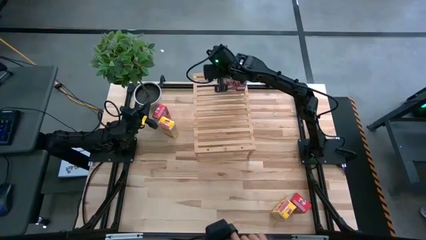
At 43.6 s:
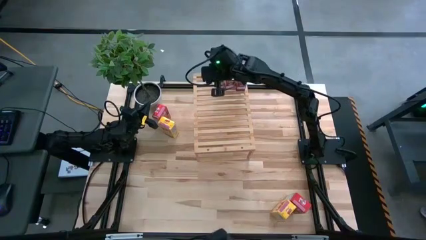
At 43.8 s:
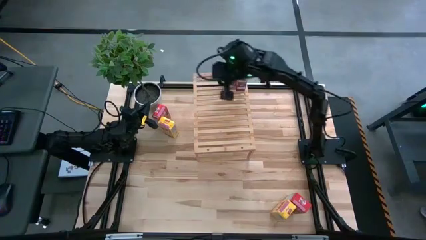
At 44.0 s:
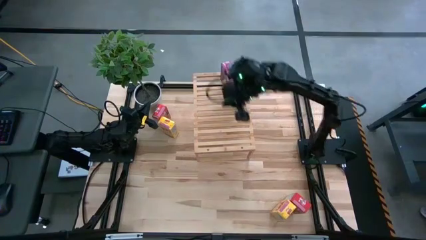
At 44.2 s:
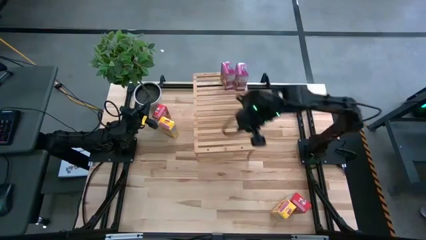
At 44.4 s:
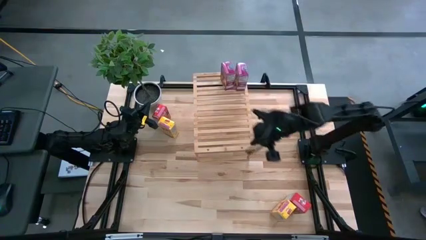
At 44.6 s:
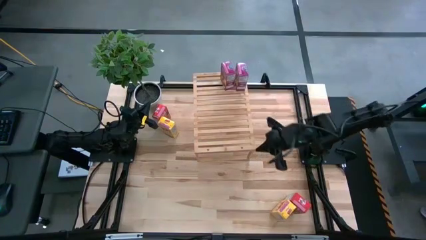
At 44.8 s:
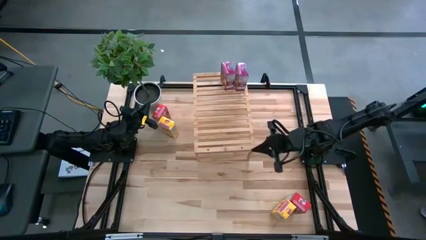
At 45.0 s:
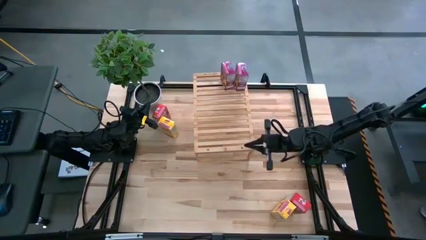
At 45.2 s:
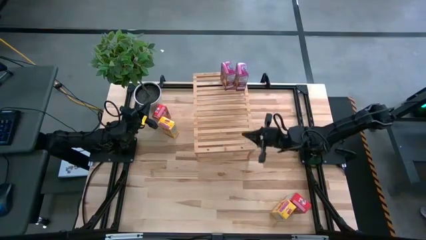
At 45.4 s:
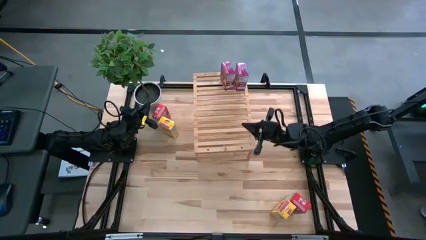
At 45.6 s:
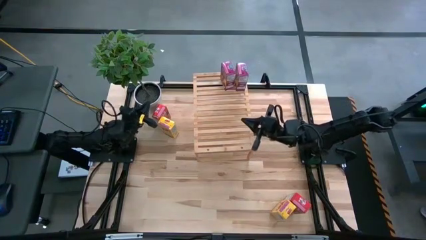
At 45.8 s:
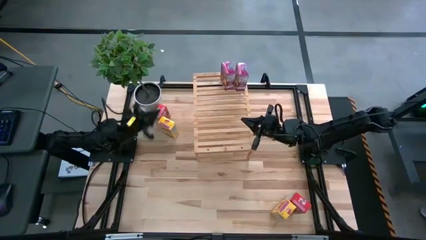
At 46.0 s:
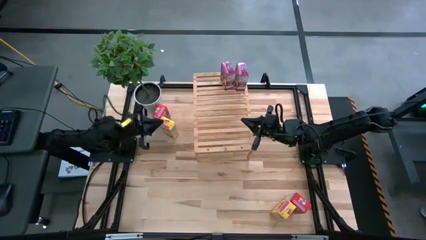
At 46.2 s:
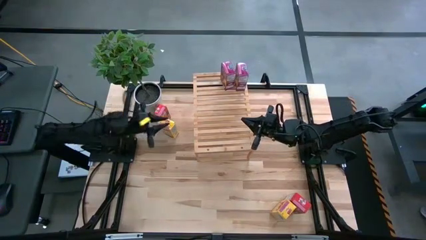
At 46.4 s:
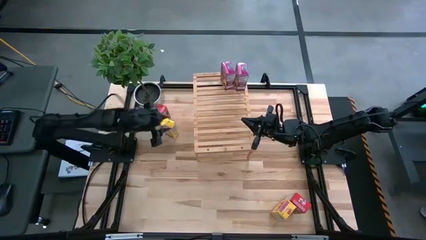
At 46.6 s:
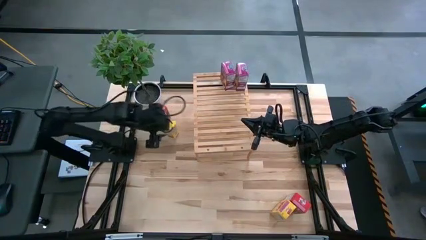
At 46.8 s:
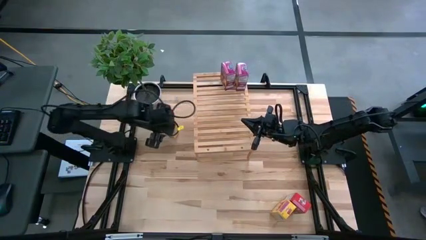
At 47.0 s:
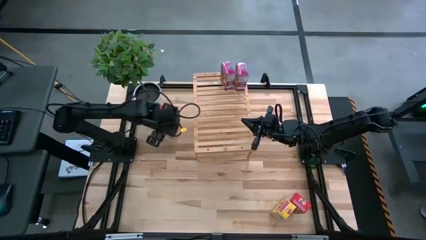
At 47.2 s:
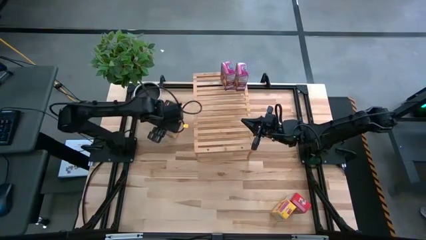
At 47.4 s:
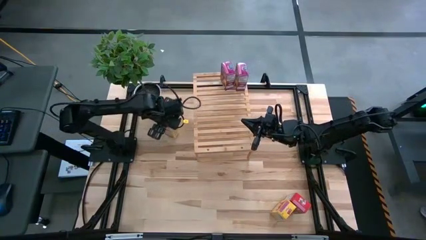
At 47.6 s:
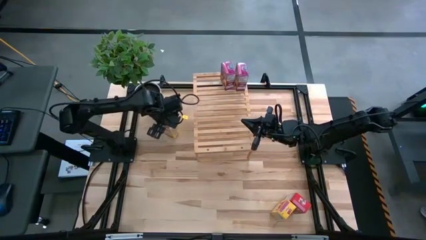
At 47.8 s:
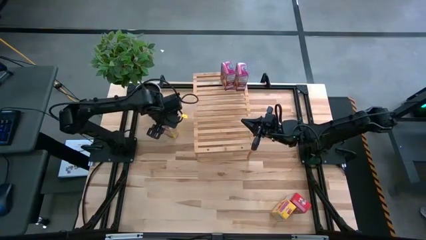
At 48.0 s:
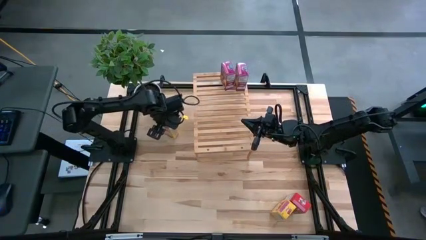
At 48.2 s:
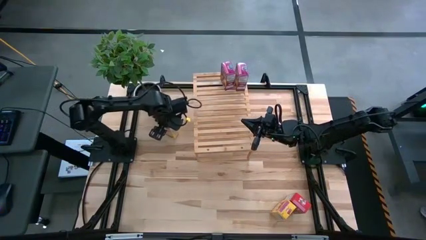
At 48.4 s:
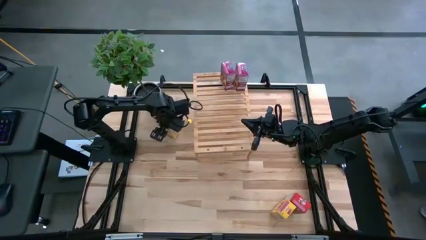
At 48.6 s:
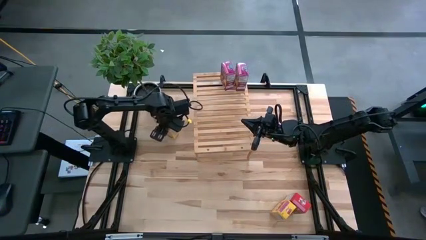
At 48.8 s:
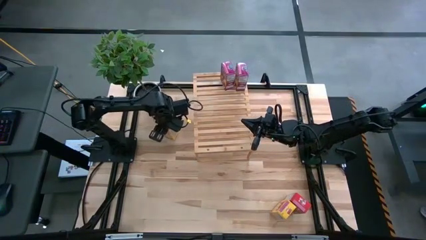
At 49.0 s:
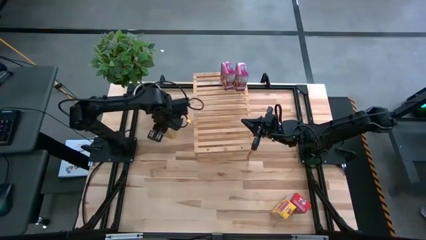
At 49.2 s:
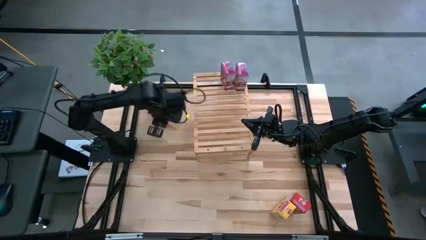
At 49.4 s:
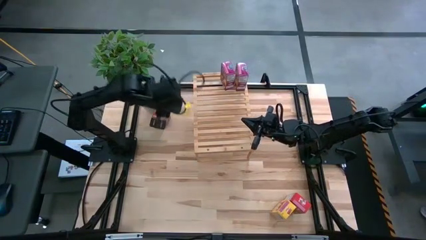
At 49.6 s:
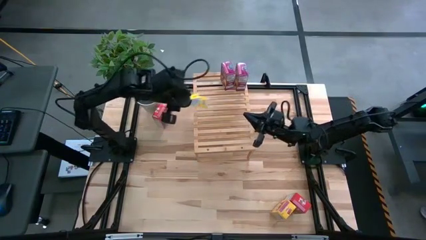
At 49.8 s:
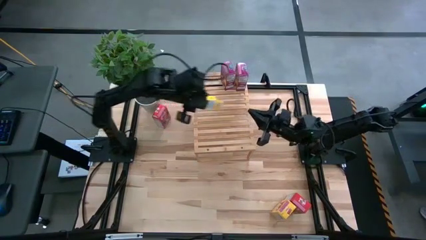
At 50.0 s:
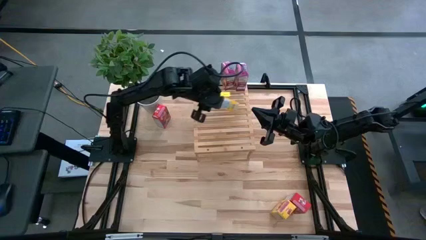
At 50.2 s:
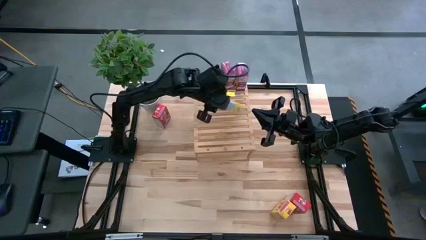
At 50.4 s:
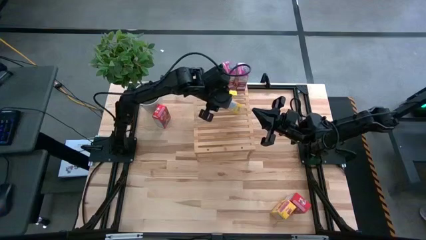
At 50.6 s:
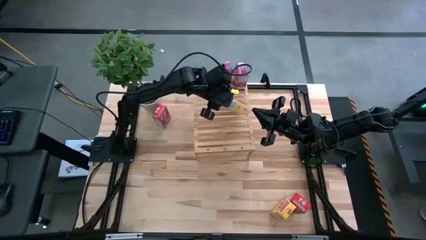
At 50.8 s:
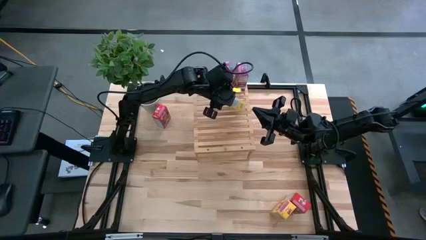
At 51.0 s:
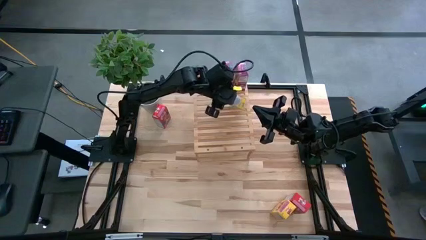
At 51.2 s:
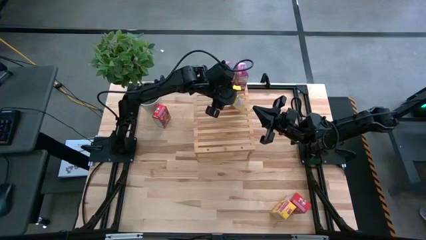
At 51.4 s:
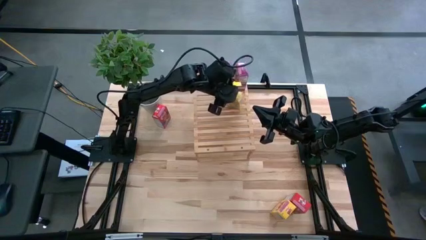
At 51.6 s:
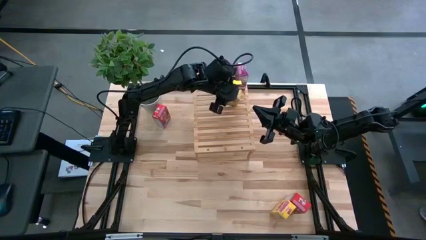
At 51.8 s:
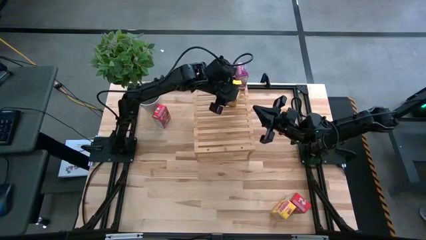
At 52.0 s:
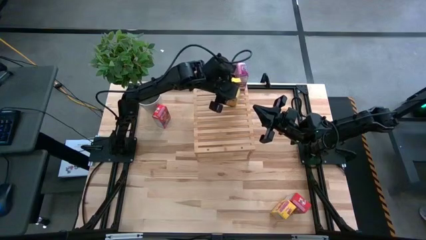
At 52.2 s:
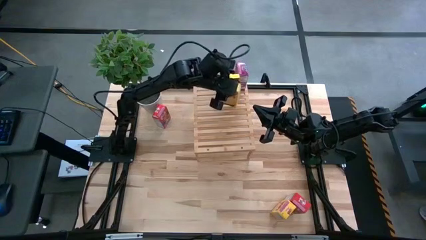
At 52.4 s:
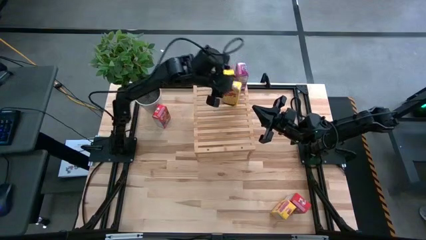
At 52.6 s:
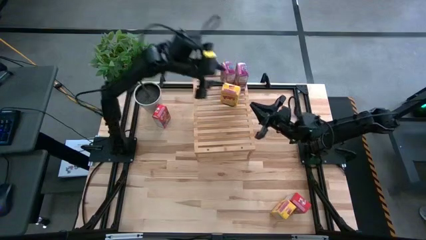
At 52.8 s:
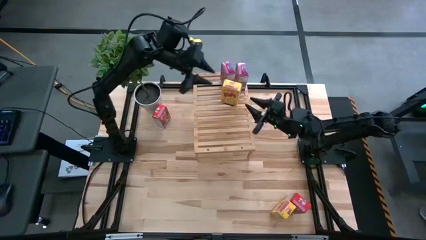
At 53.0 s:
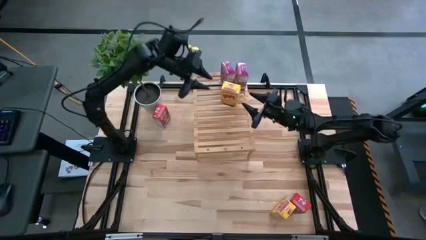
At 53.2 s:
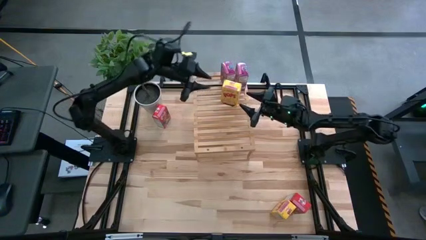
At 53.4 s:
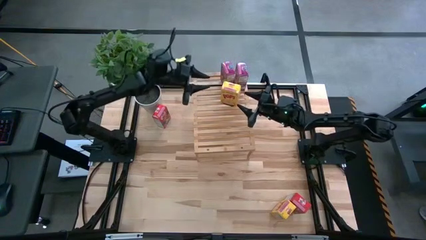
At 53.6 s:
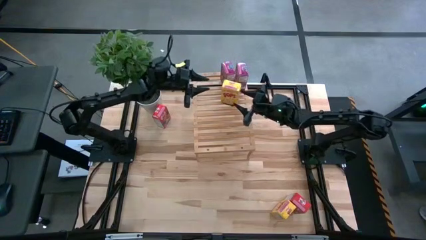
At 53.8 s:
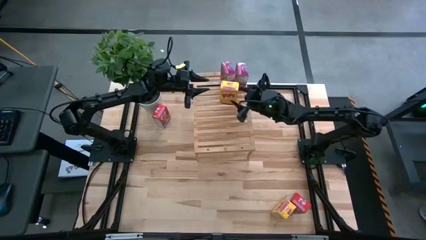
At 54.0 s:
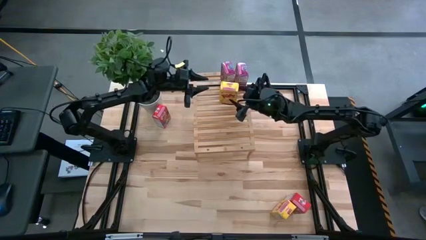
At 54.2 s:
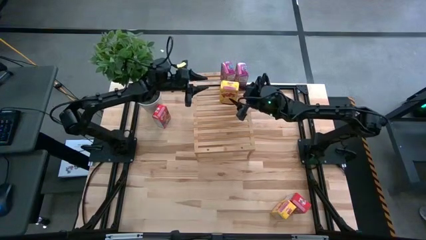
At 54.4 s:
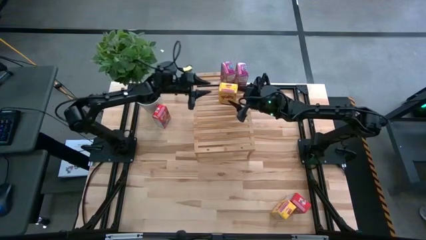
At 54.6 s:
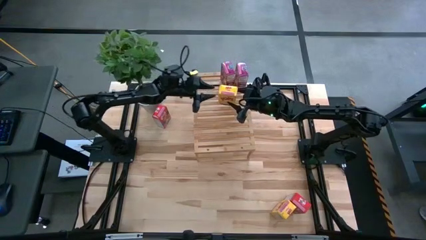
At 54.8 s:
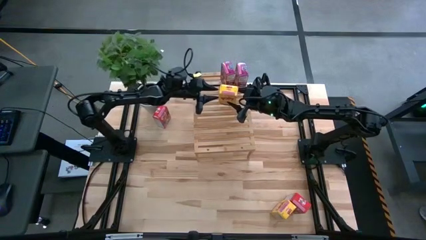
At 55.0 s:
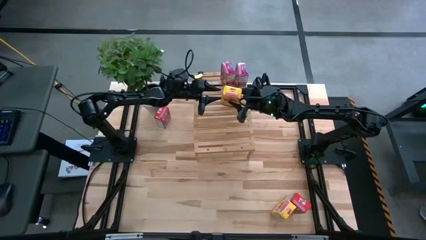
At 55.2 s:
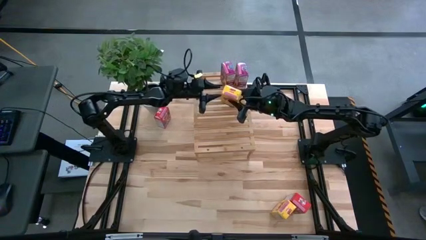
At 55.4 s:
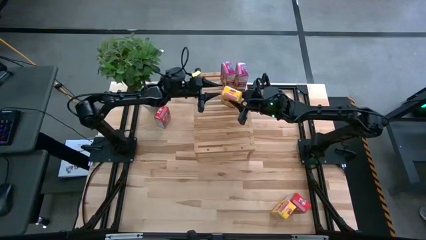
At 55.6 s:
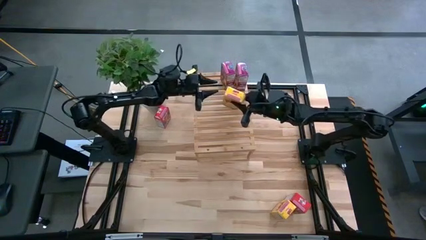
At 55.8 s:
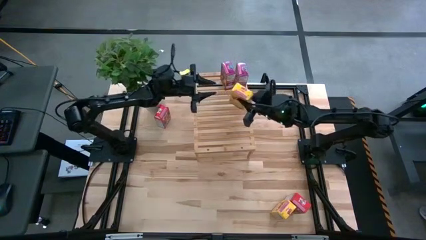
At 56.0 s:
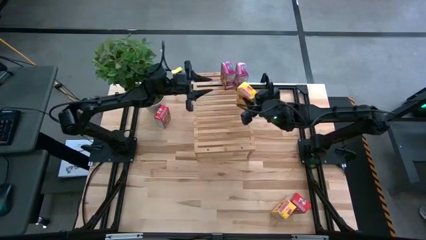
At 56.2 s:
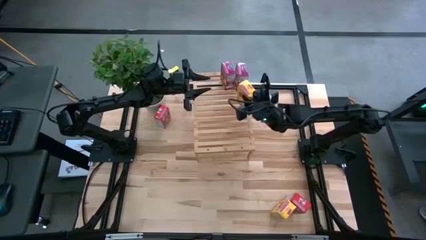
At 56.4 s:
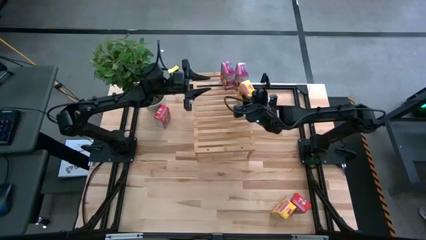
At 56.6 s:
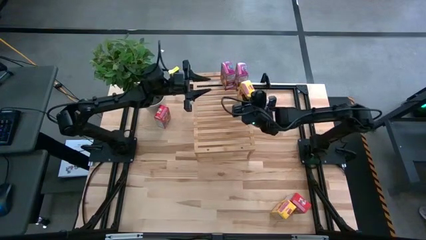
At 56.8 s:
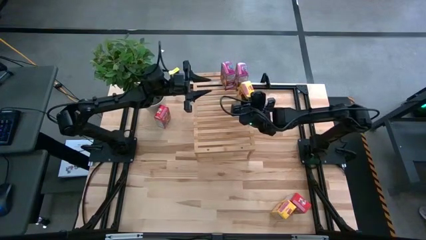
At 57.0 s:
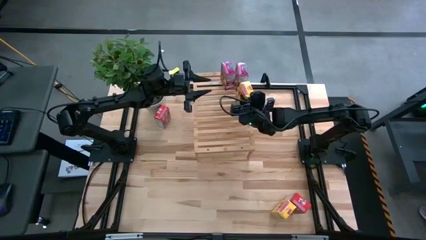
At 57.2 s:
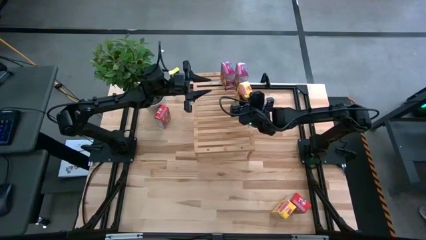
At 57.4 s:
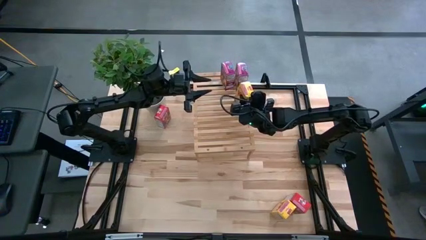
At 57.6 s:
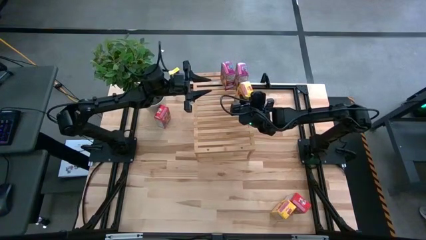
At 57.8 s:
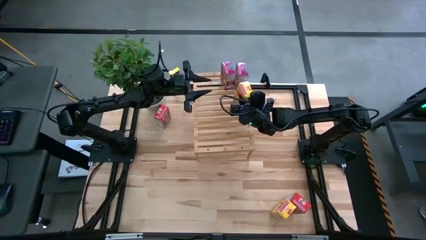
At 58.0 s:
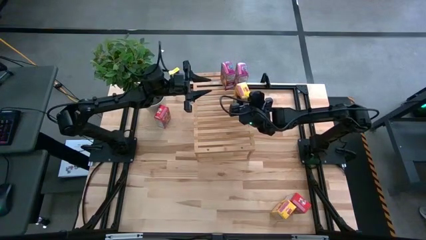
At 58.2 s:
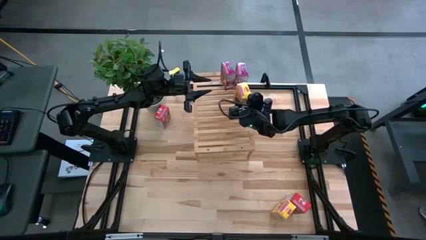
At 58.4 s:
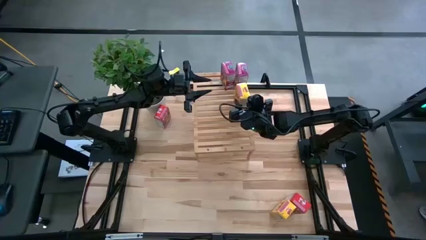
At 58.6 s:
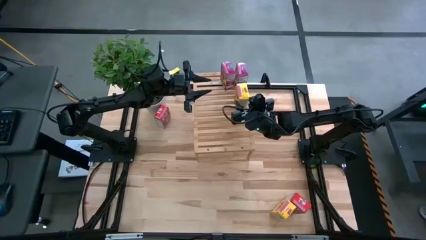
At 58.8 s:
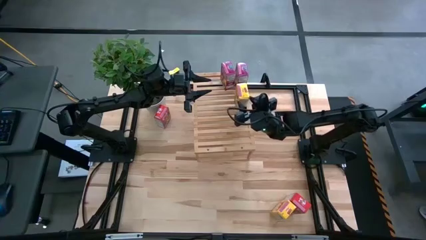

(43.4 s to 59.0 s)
Task: Stack cereal on shelf
Put the top yellow cereal box on the shelf
